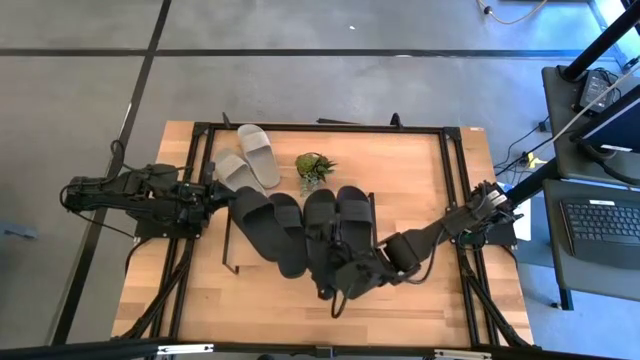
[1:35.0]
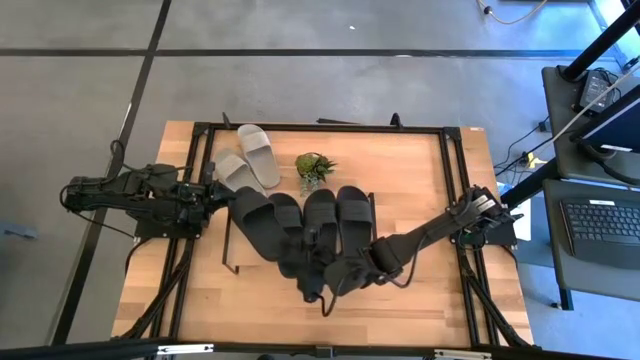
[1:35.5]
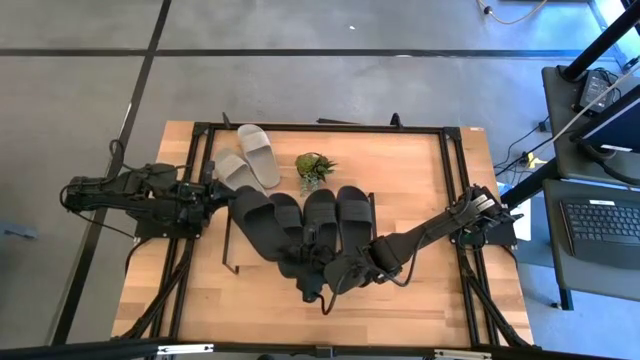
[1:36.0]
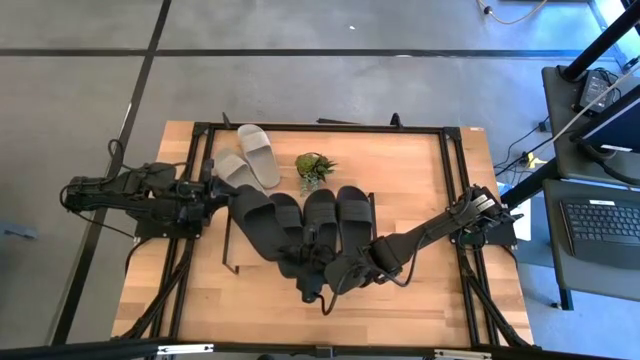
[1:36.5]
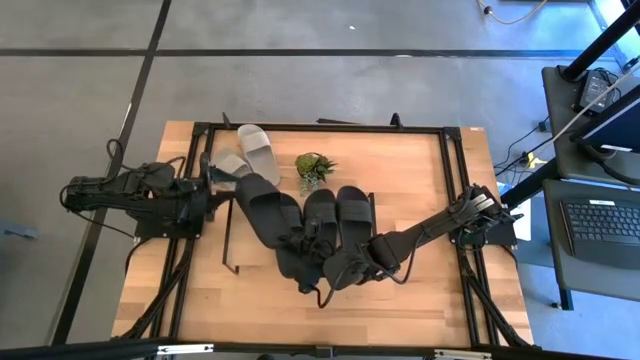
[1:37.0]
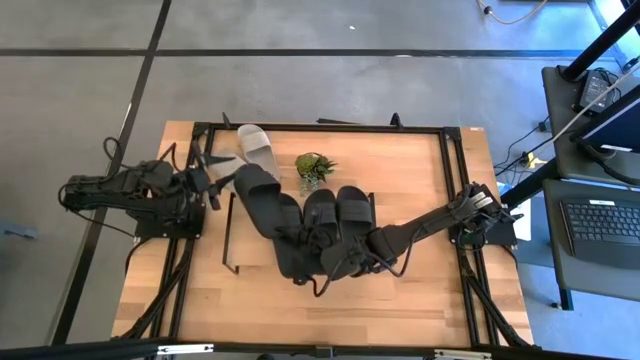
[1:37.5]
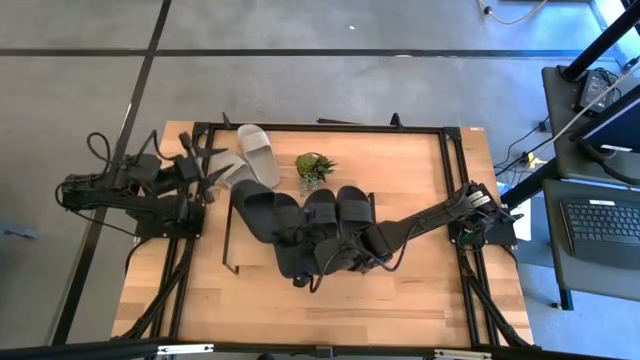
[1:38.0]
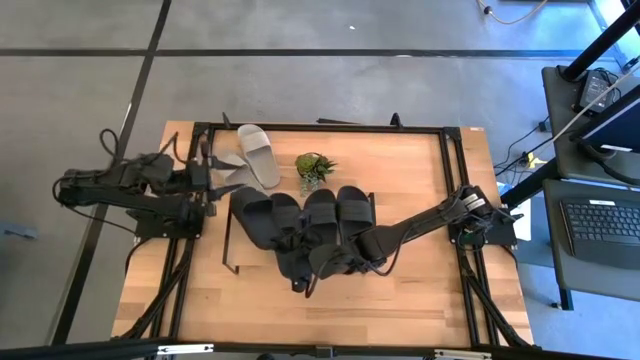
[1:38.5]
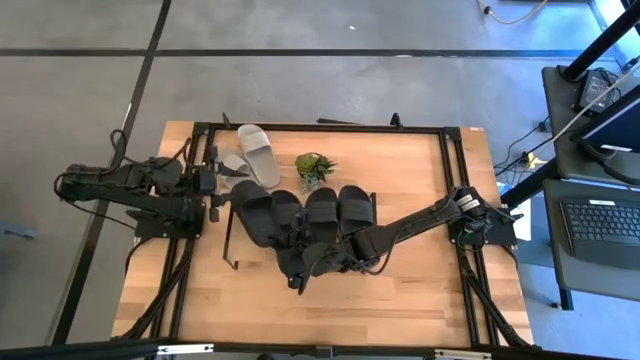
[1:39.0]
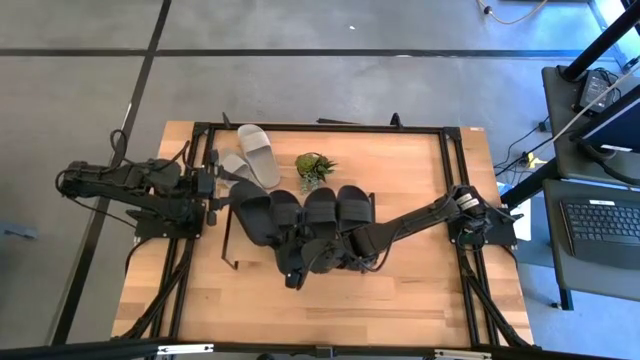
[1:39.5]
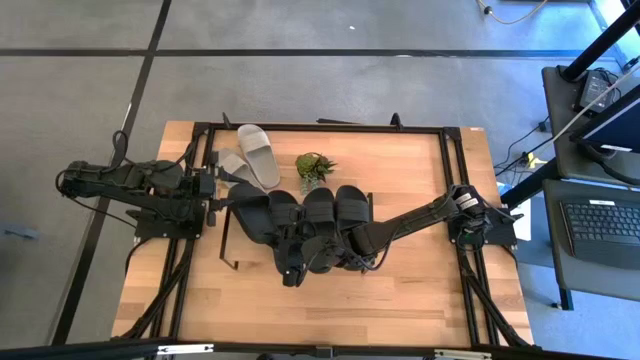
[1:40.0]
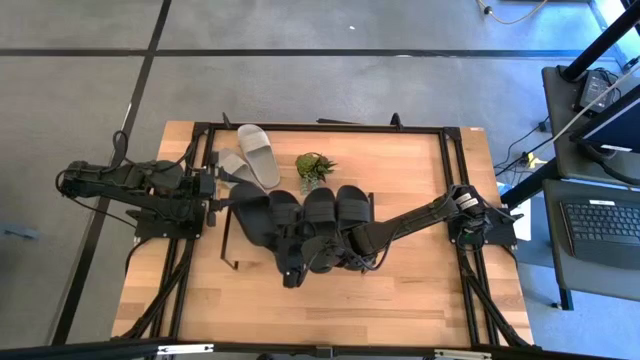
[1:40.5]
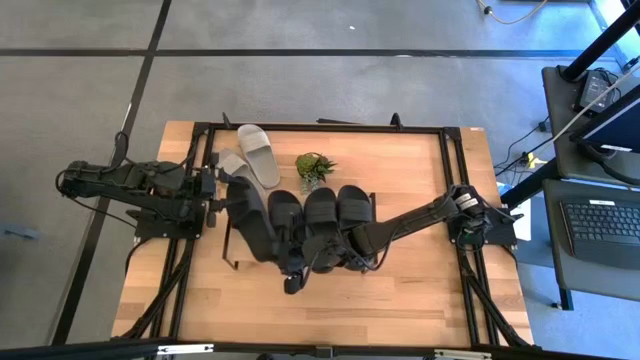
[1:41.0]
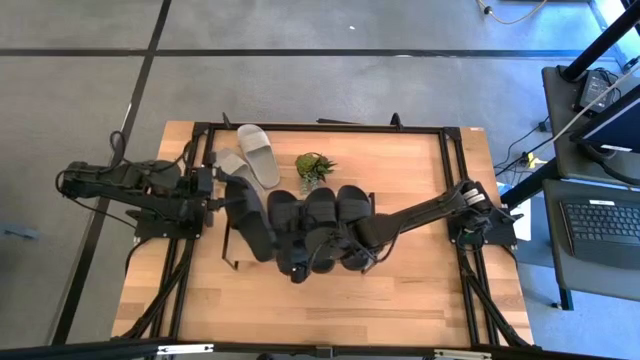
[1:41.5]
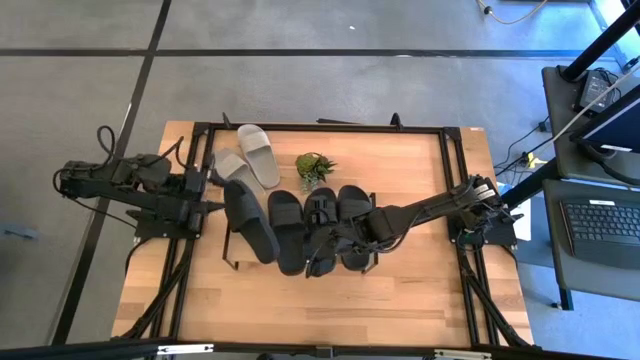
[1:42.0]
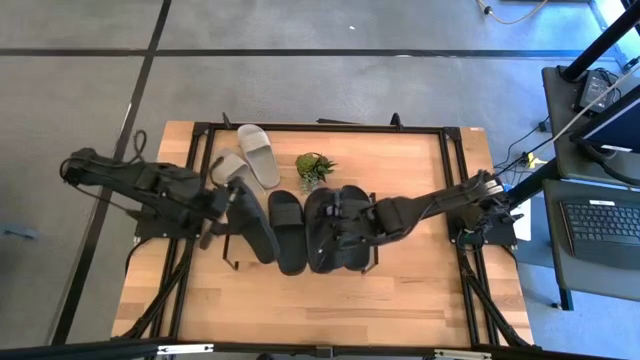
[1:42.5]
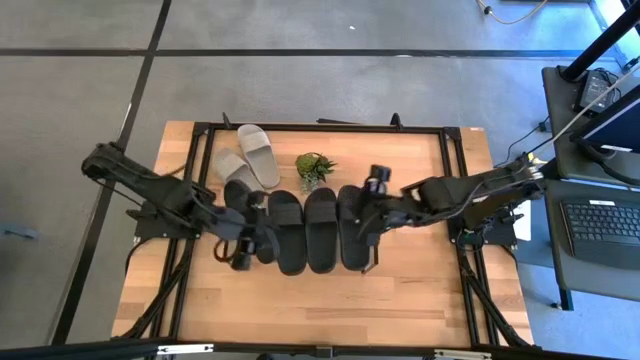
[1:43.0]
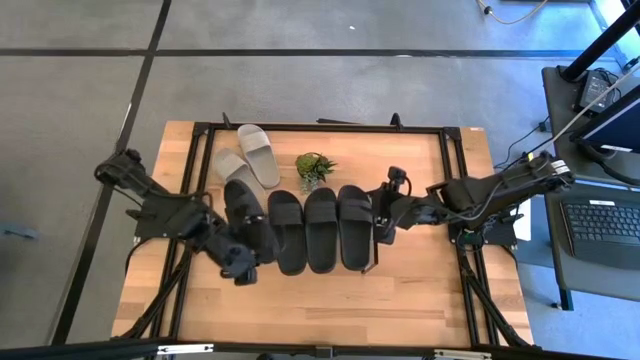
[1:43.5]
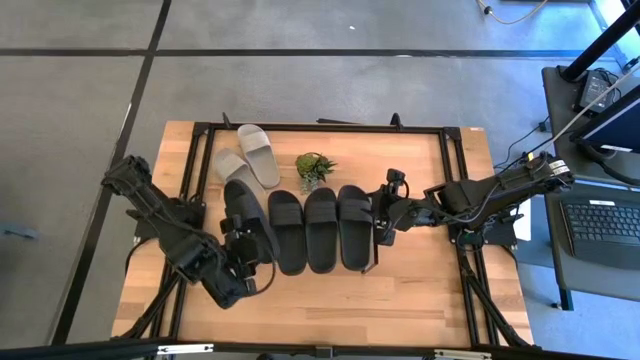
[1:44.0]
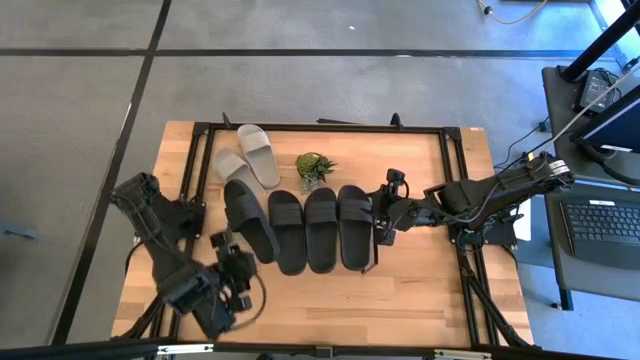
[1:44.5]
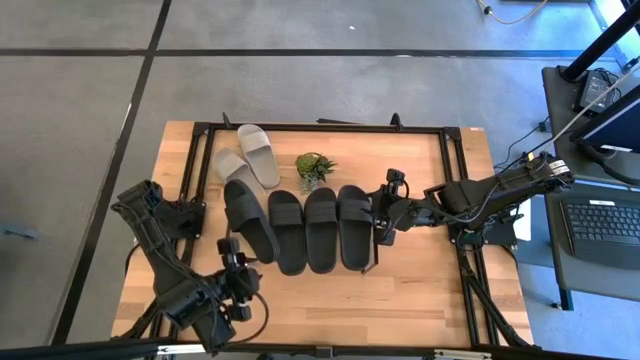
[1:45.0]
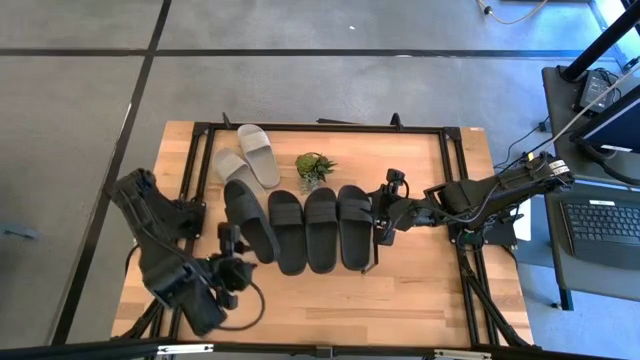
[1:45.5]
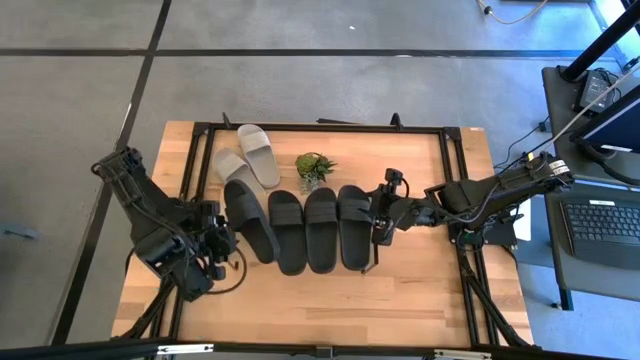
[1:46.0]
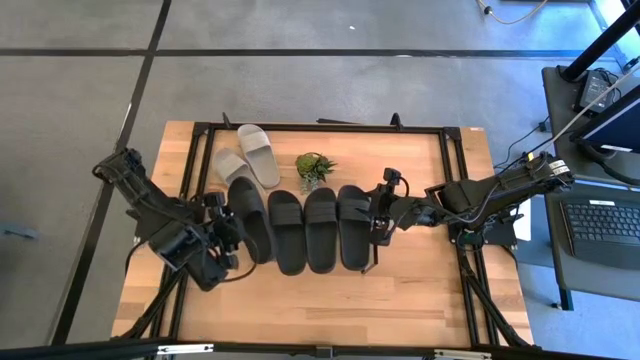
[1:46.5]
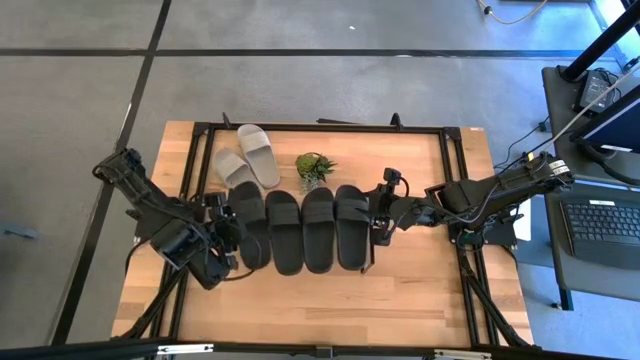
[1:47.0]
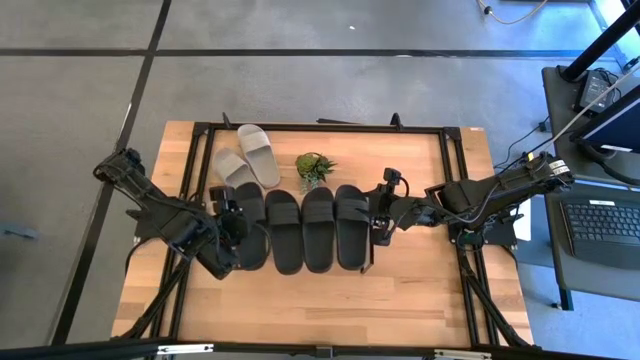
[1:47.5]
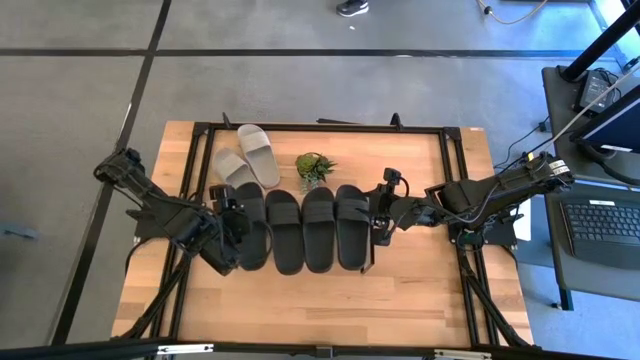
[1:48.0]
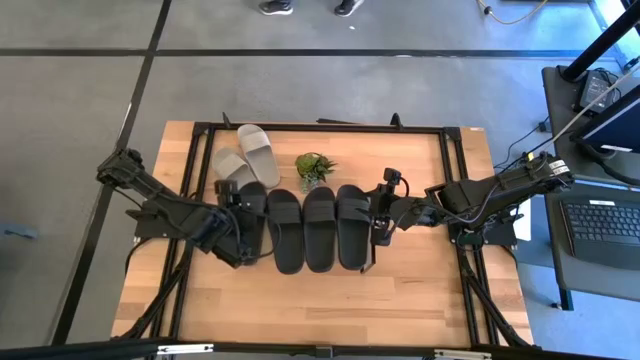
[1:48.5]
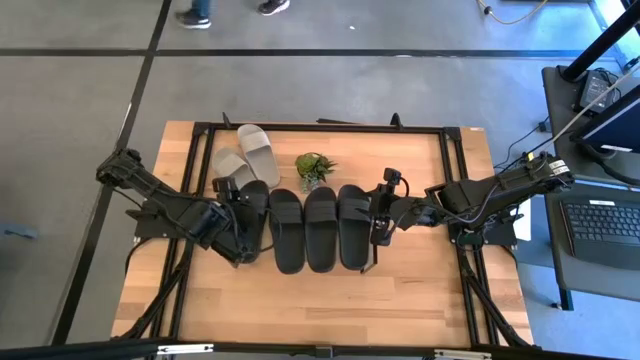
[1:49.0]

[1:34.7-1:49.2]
Task: Pick and place slides into the shelf
Put the black slide on the shelf

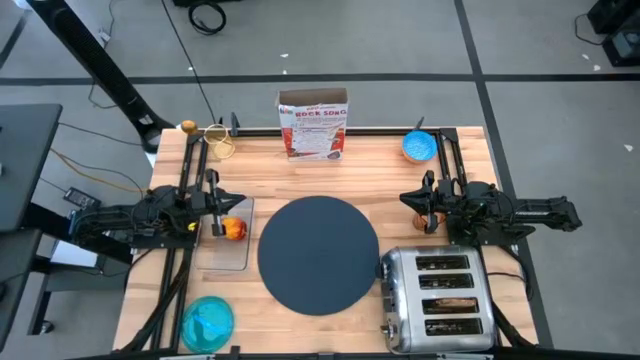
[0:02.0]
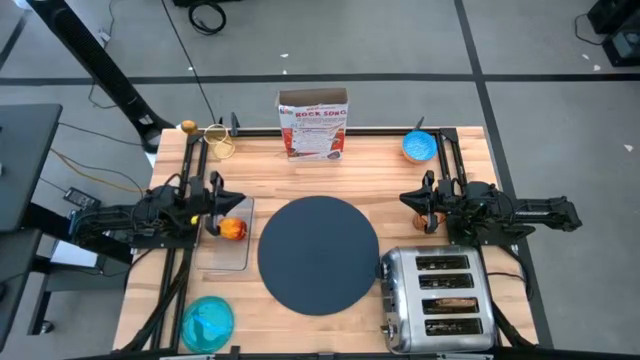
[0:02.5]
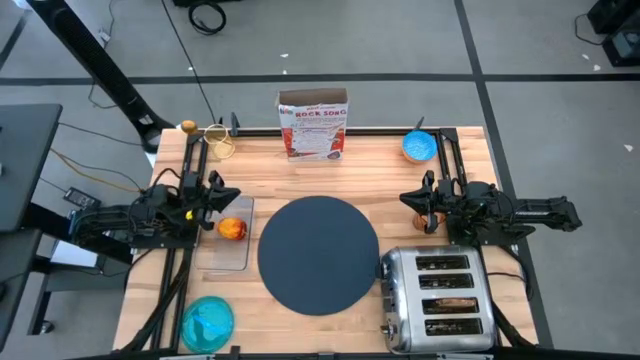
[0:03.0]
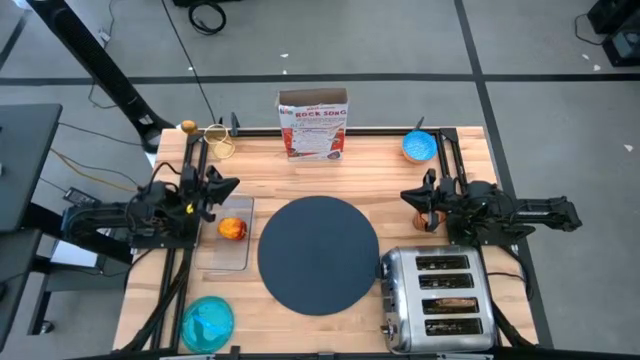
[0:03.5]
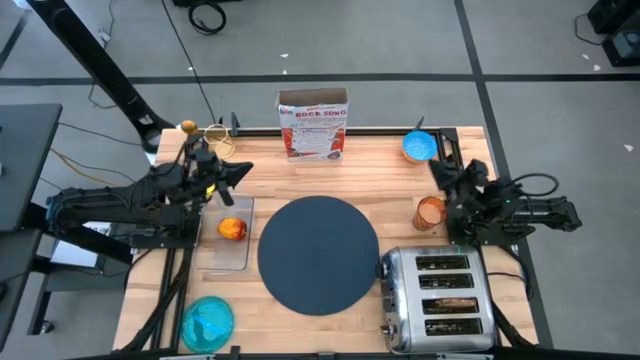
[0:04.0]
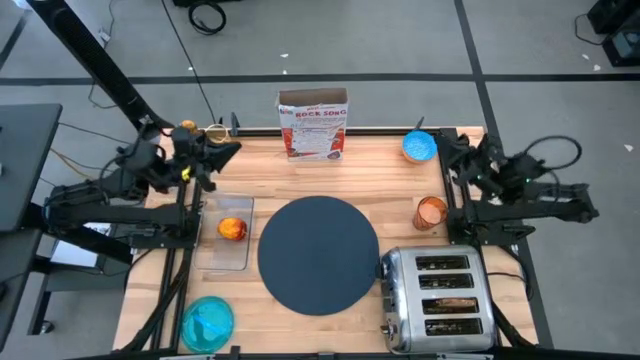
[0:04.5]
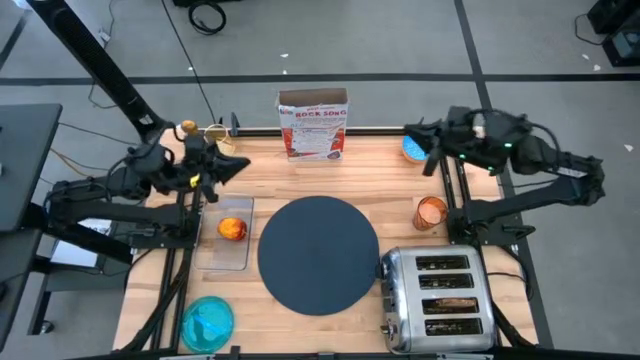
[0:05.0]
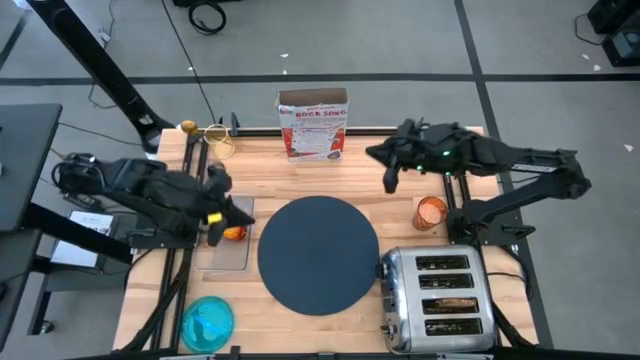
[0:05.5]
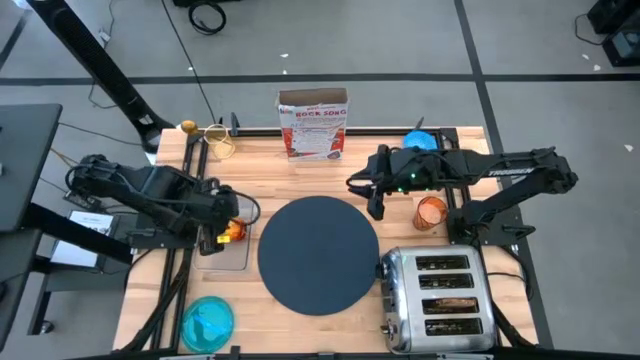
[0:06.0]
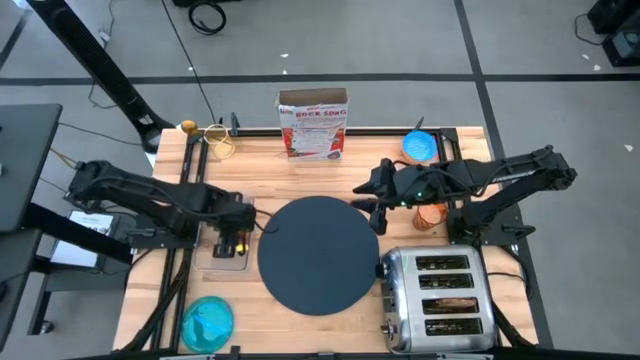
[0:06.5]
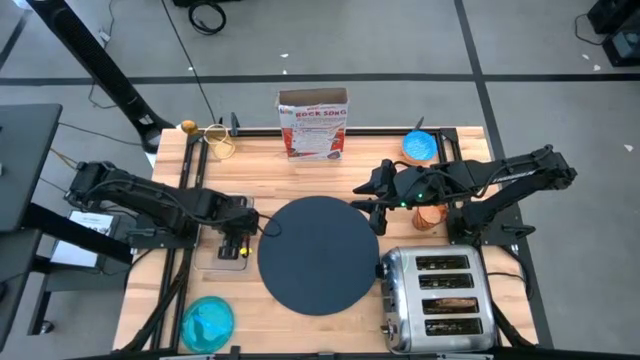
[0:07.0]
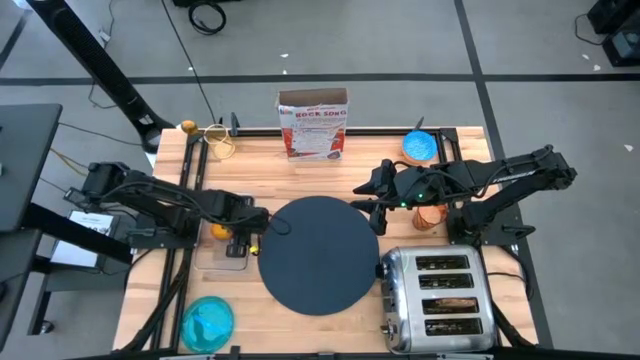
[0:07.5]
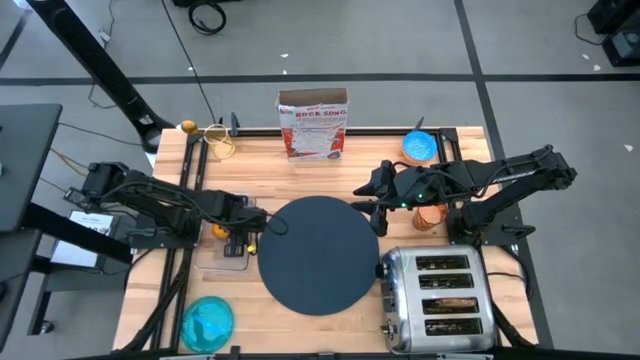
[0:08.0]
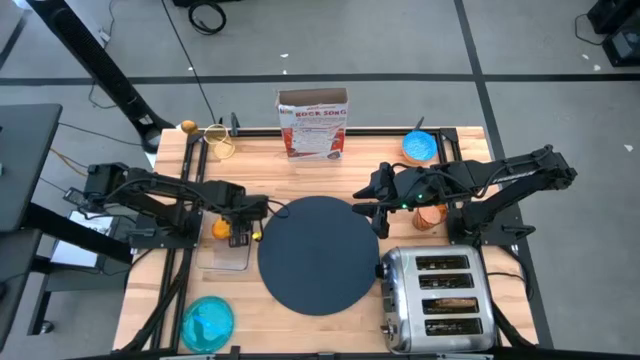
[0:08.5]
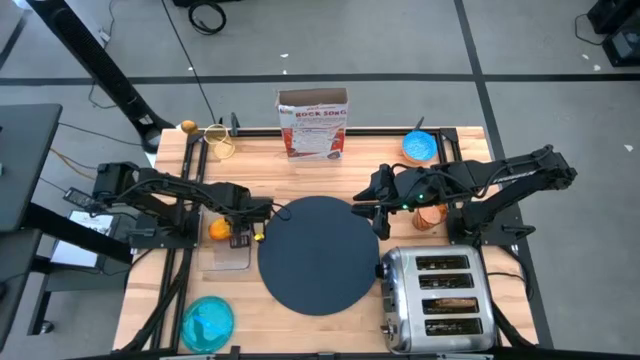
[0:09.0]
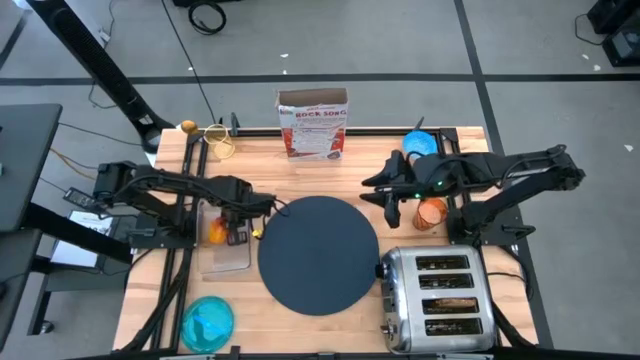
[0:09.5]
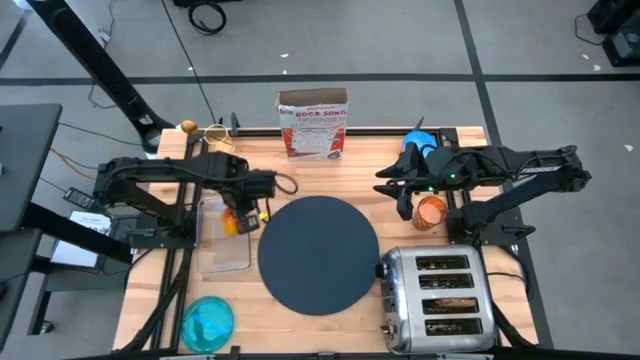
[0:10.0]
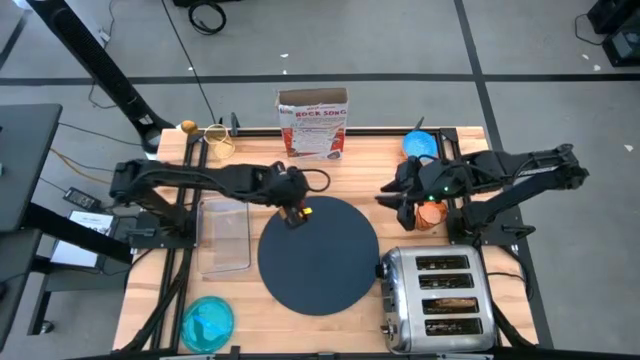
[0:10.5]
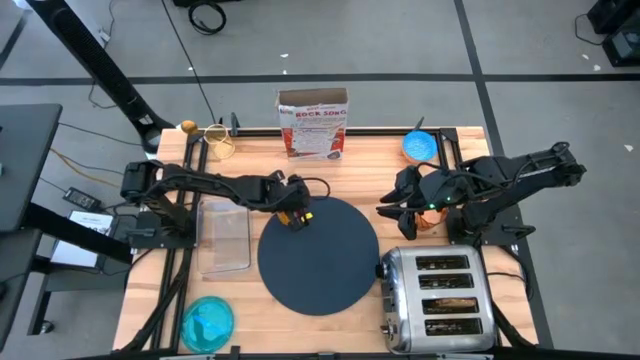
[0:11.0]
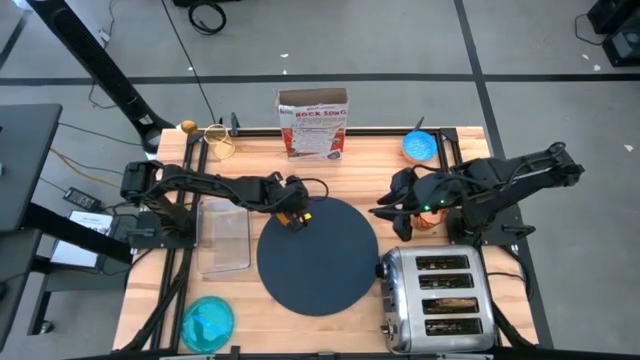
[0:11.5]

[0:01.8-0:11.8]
Task: Arrange a breakfast setting
Put the red apple on top of the dark blue placemat beside the blue bowl
